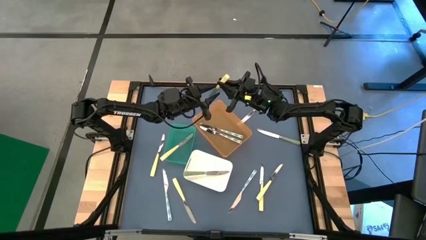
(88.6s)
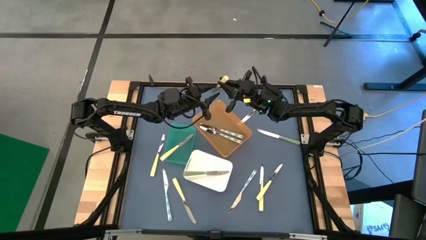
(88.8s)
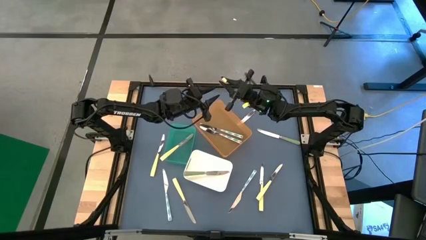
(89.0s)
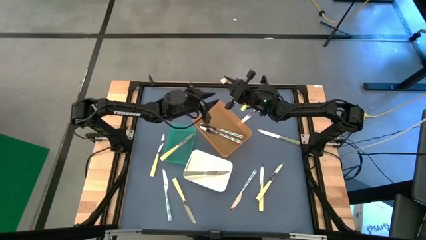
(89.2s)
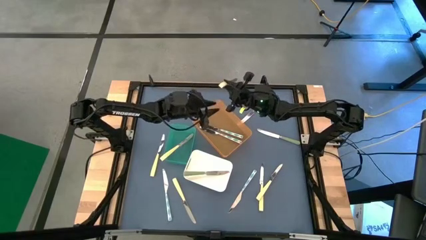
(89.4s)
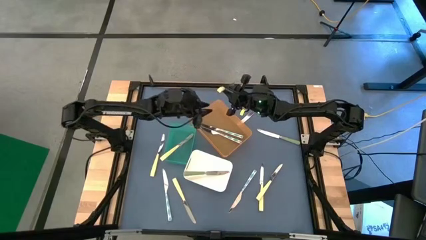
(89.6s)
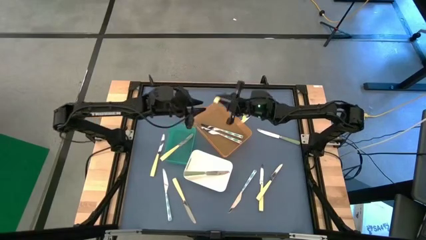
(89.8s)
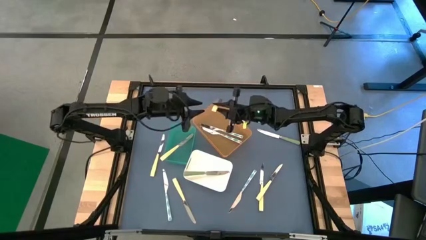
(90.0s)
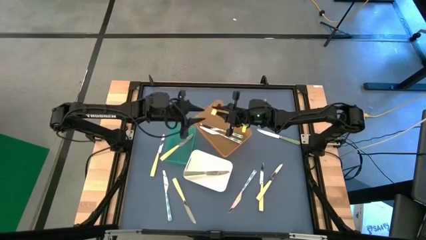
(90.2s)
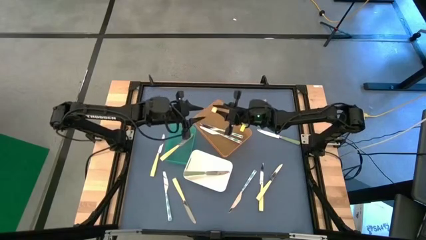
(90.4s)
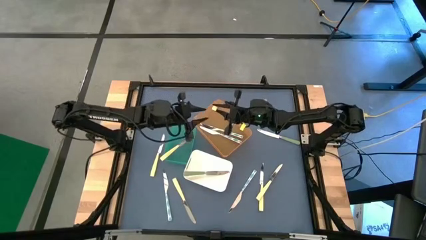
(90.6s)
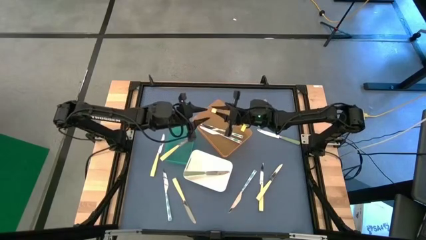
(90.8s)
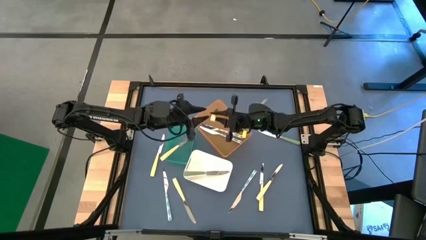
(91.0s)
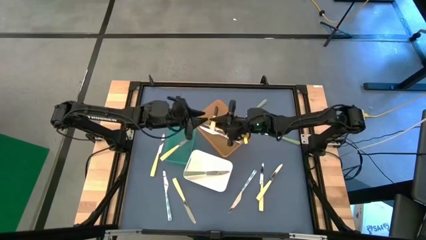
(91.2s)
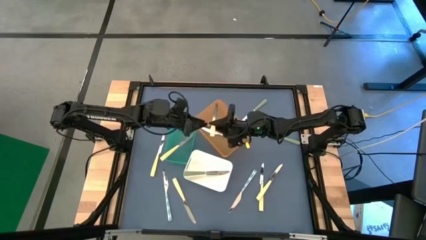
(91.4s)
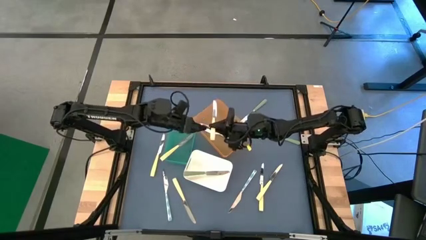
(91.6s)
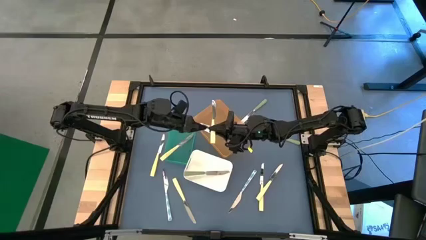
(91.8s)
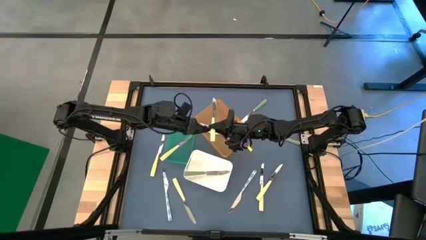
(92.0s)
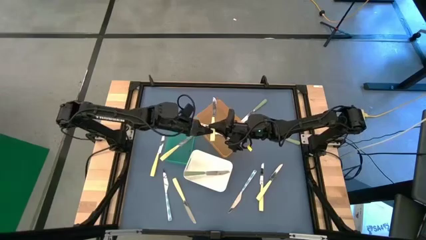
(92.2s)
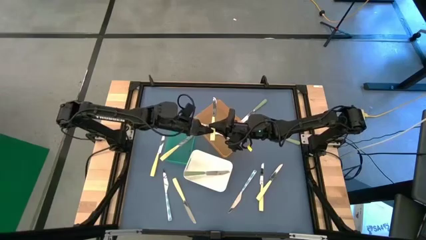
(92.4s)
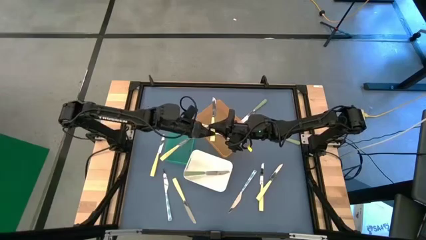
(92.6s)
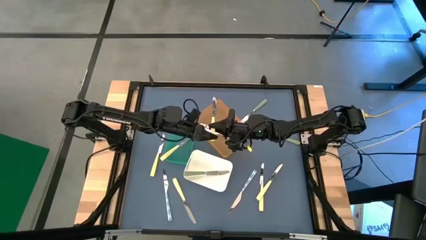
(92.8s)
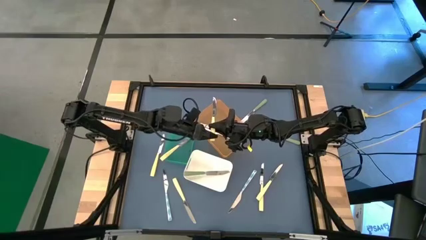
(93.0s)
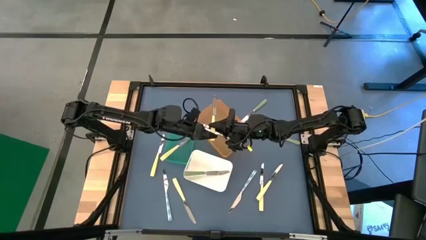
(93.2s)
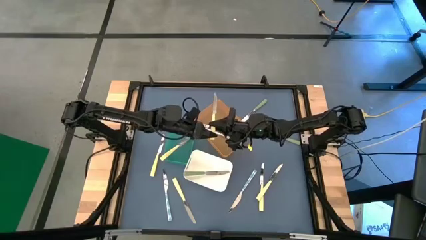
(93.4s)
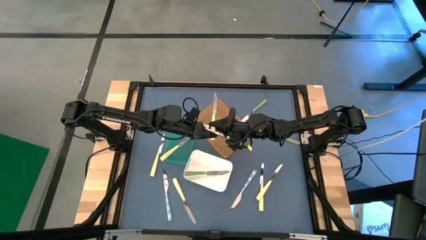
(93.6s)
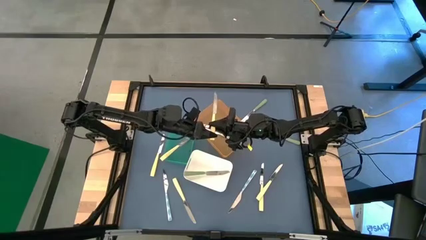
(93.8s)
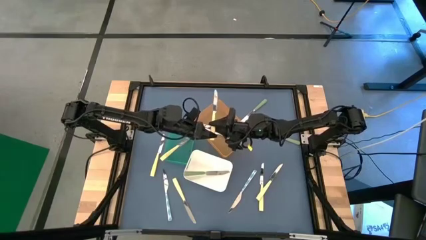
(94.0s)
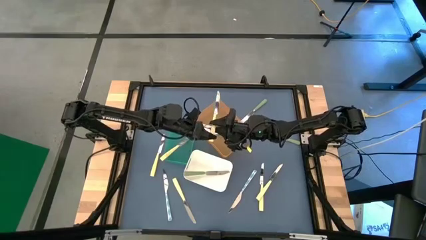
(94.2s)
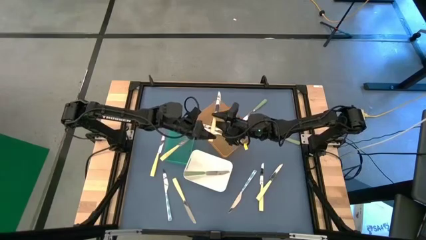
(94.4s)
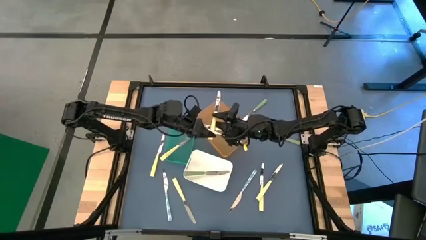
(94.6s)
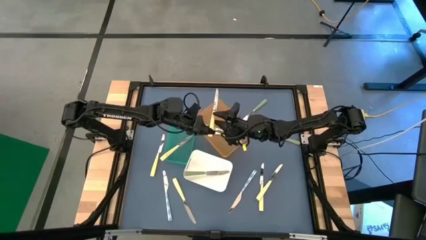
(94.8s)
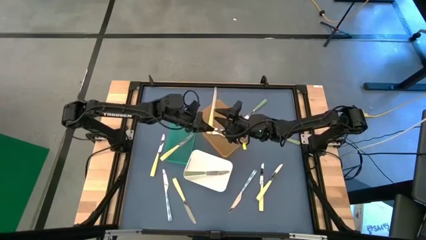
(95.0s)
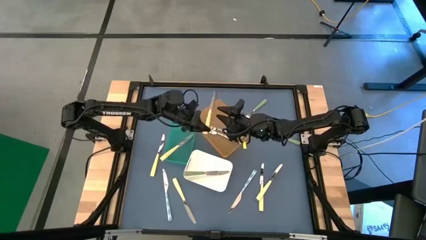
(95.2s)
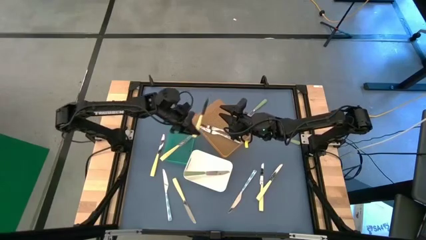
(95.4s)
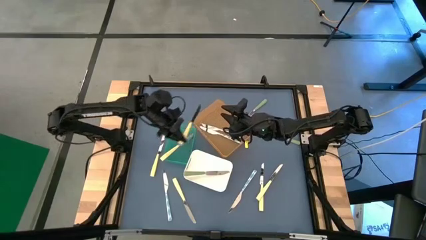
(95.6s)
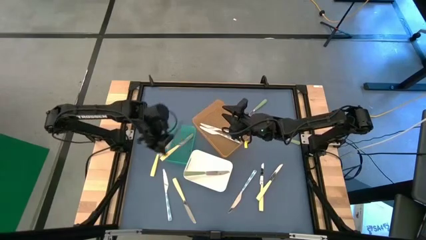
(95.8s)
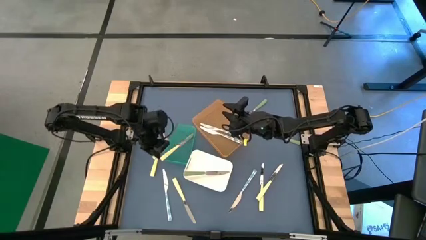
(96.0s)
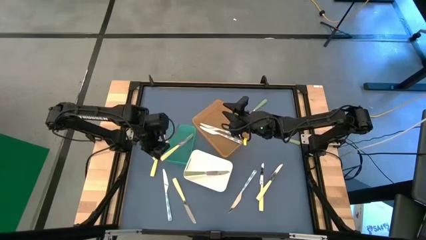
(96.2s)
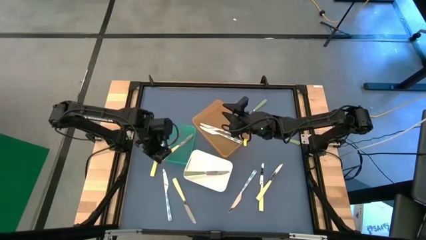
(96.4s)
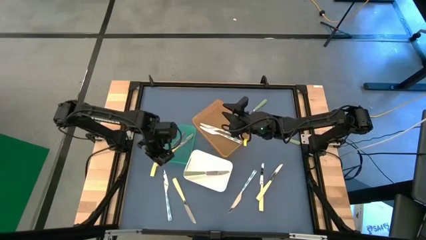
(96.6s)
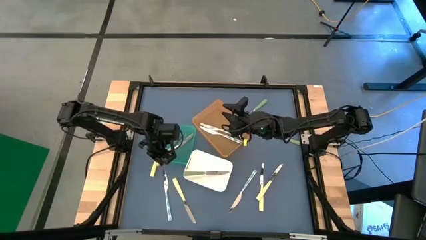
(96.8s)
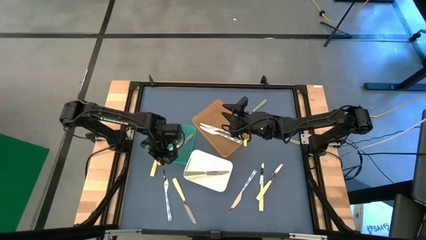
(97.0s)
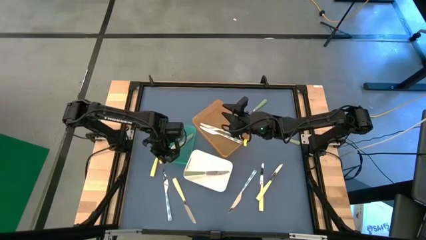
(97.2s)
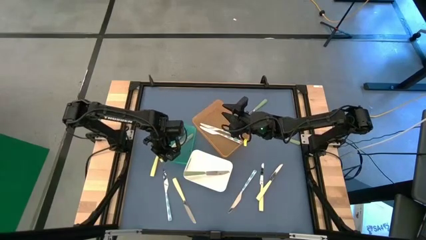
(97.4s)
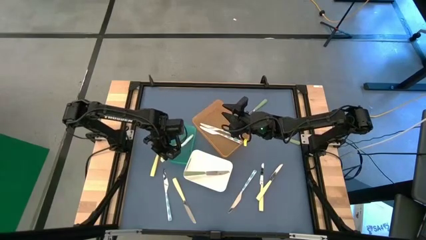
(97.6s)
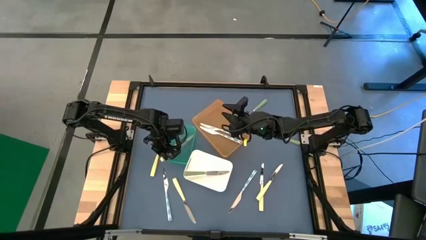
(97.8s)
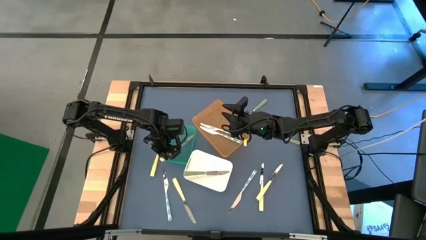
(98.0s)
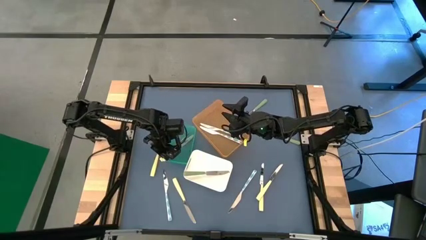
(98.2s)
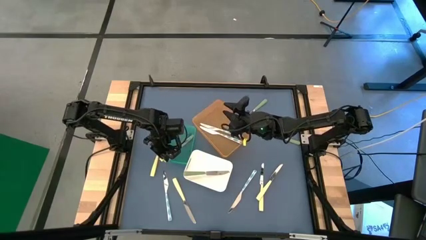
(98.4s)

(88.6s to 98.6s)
Task: Sort silverware by color (type)
Put the yellow table knife into the green bin

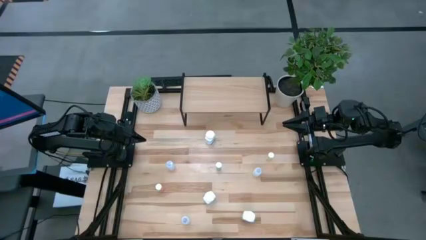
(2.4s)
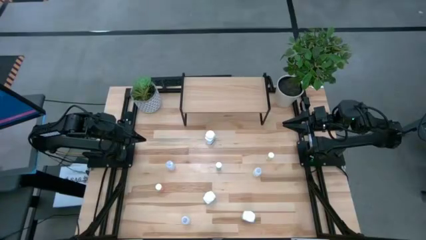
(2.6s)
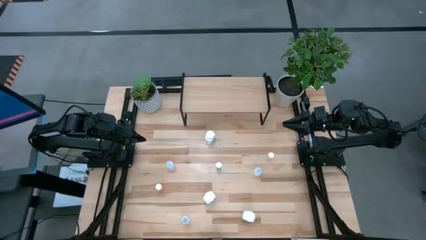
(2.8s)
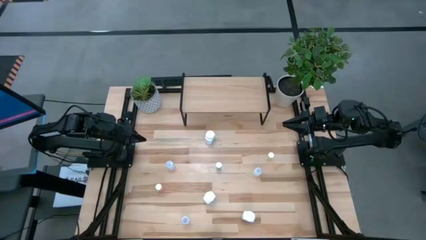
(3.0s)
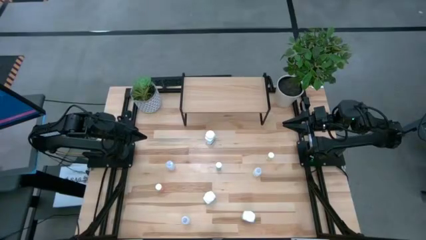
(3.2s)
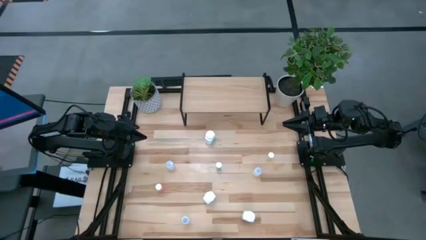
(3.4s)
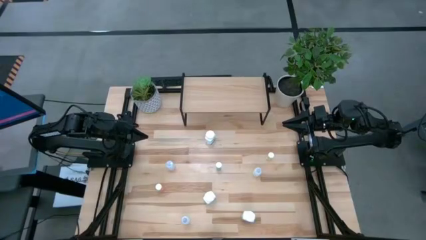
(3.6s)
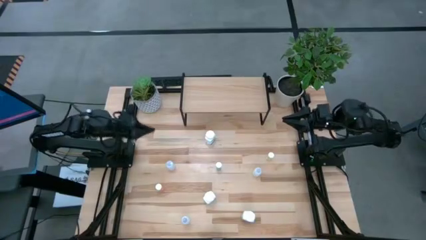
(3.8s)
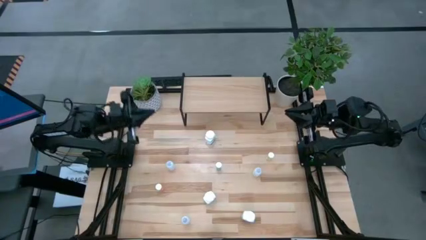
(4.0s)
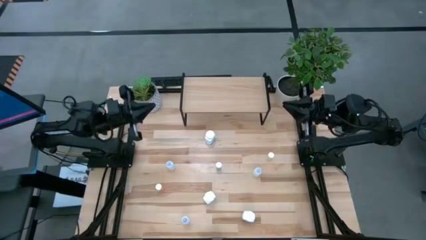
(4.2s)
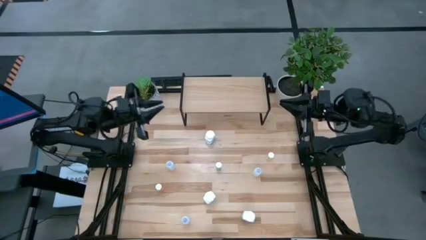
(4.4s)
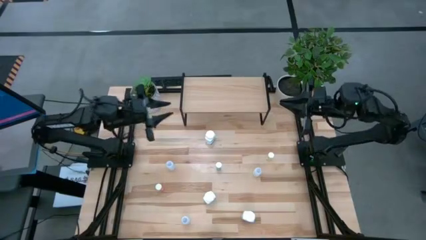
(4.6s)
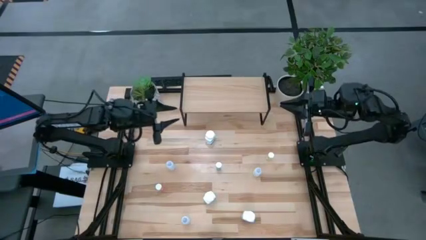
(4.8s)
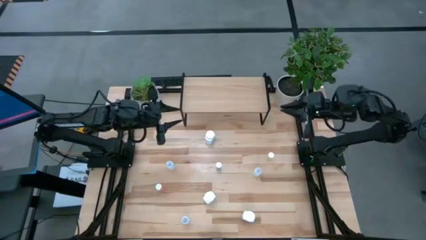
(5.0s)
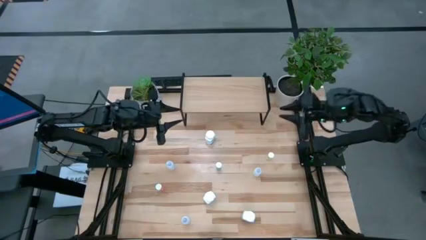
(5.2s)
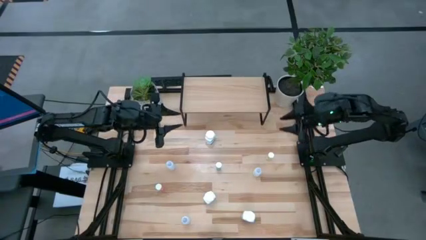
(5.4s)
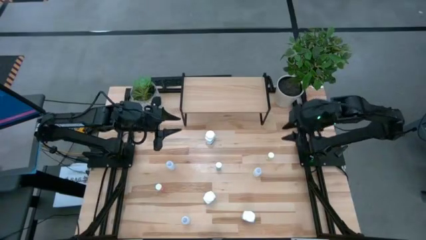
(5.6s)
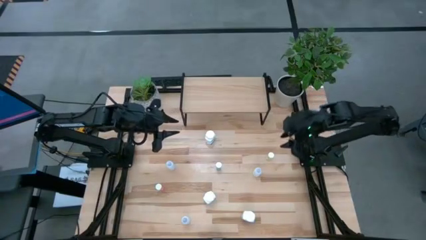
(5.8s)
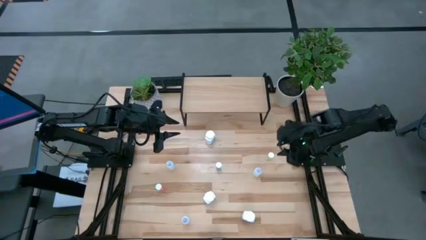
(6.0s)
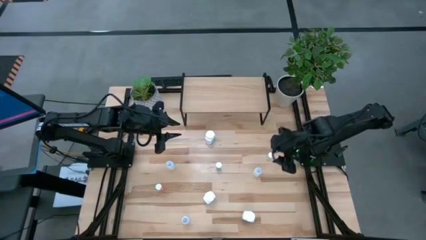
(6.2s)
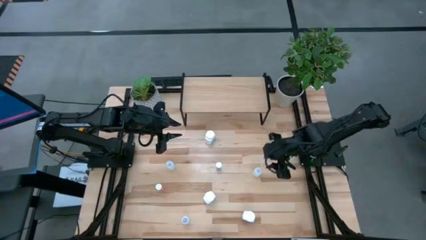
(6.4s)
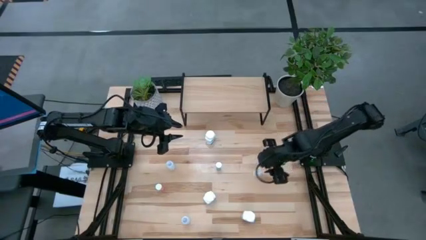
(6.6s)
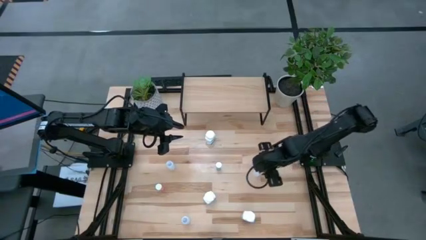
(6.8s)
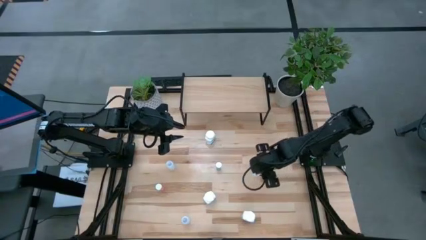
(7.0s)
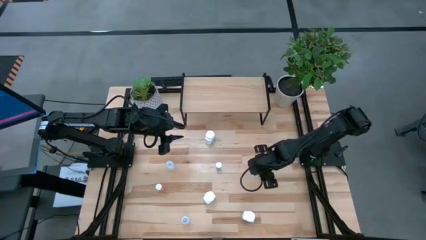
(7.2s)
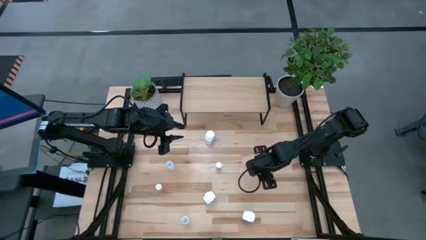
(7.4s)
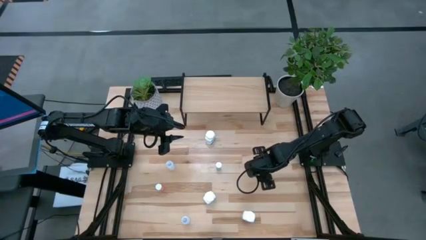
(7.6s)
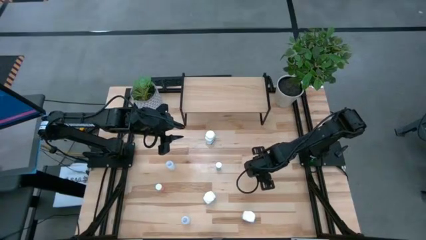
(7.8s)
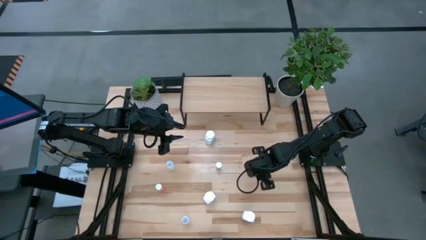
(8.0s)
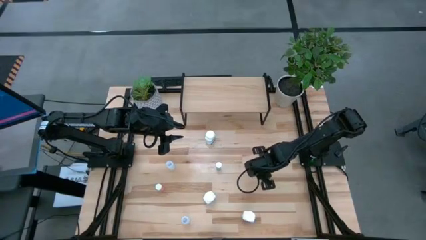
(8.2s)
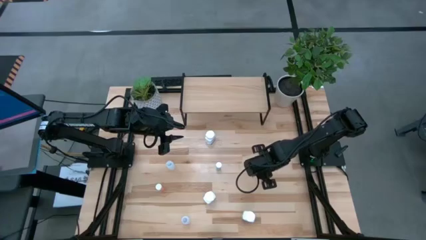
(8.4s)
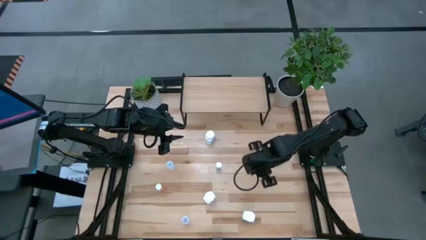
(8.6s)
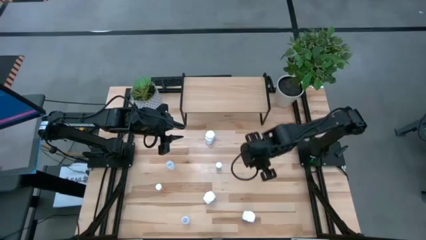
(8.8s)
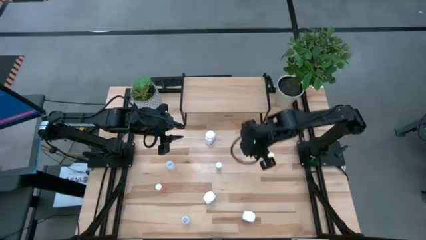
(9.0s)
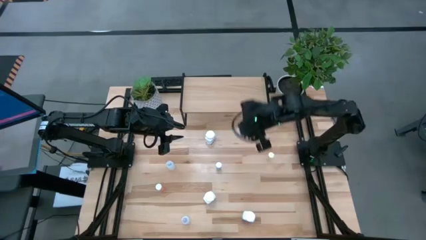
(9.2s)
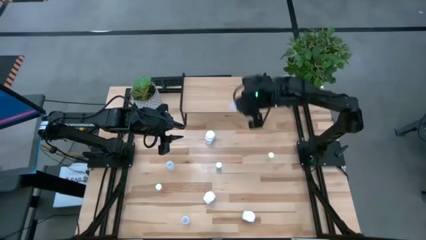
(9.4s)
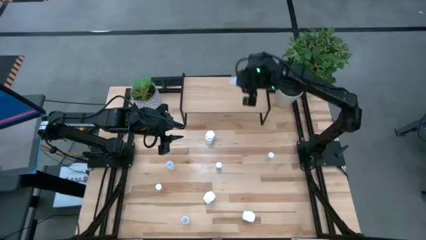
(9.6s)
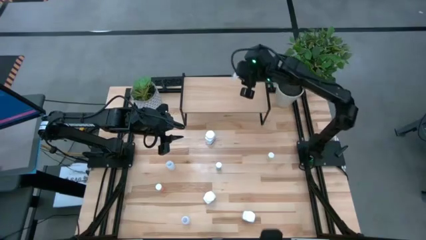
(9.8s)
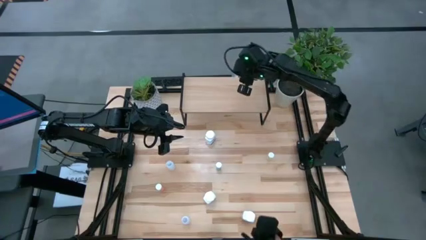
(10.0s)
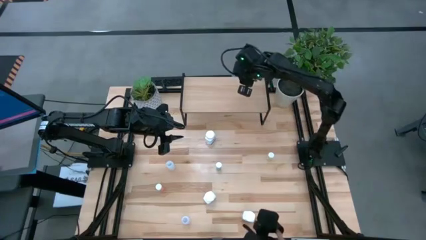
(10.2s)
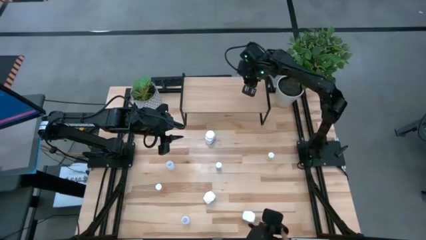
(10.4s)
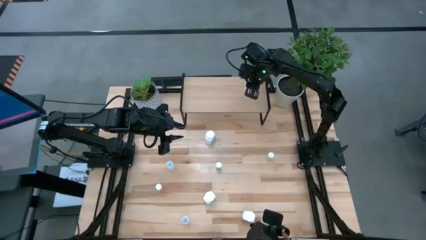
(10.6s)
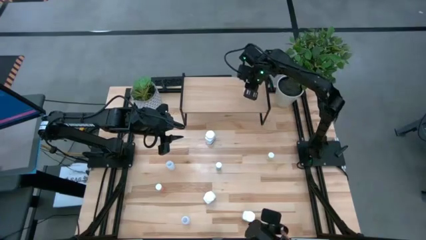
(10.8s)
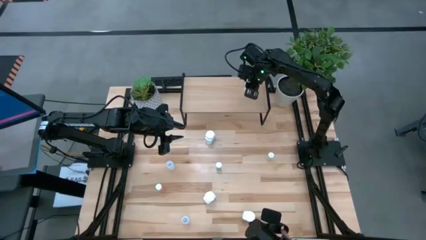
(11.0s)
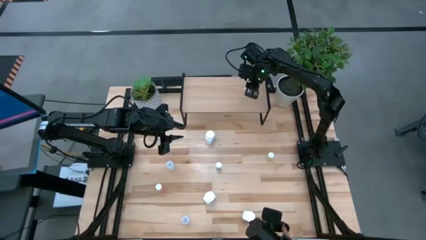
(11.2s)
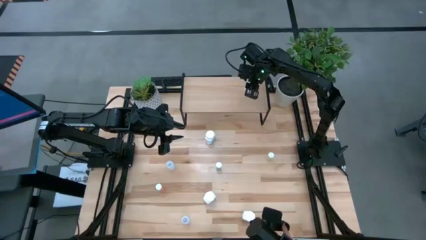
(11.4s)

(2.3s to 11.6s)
Task: Pick and place medicine bottles onto shelf by color
Put the top right small white pill bottle on the shelf
